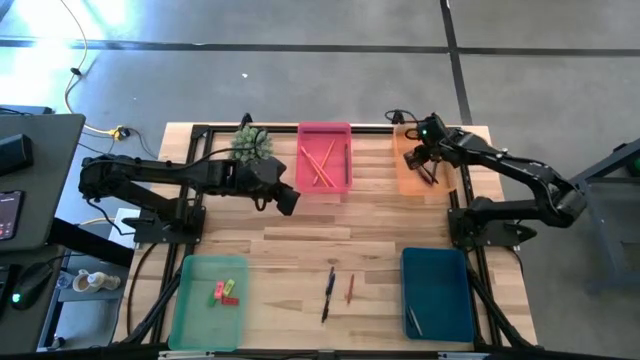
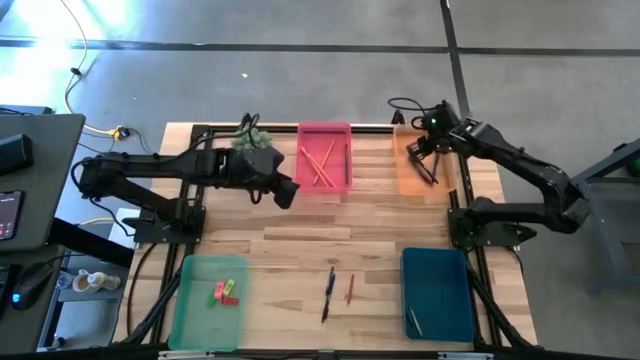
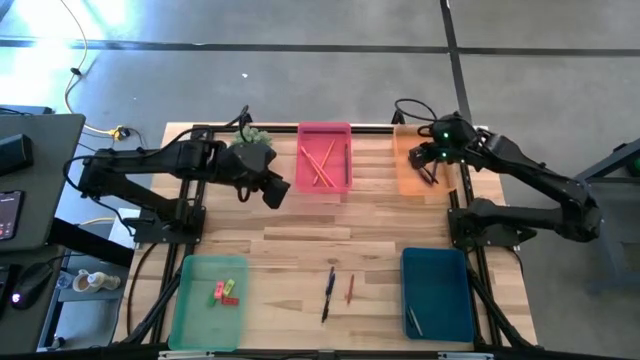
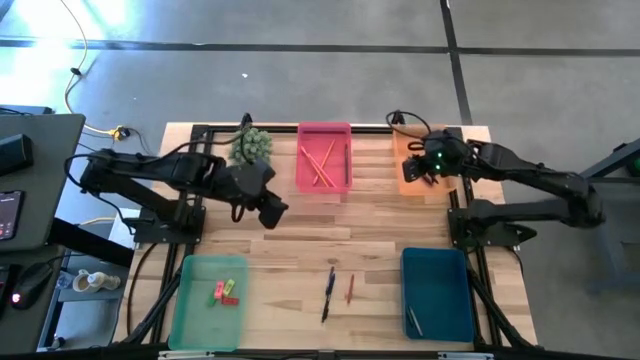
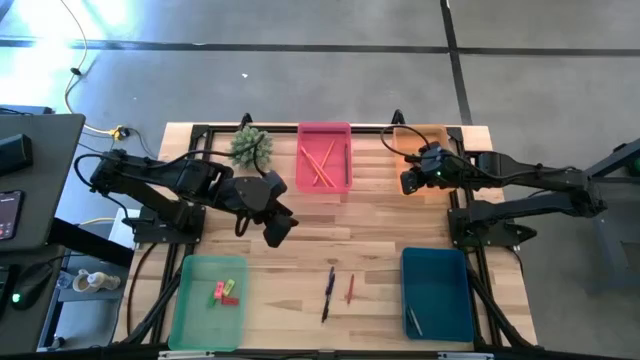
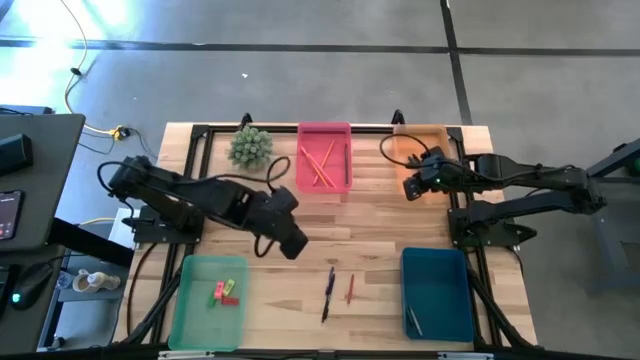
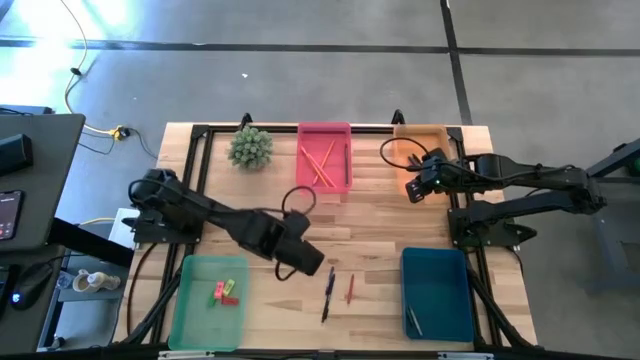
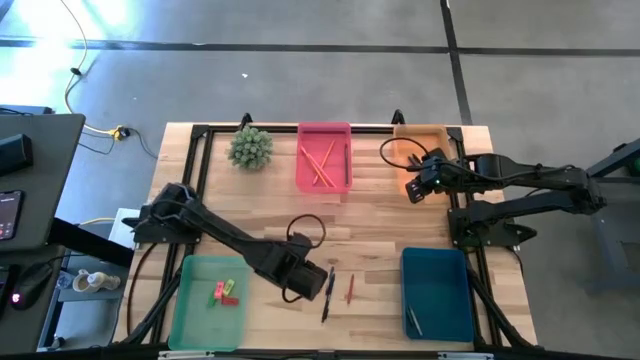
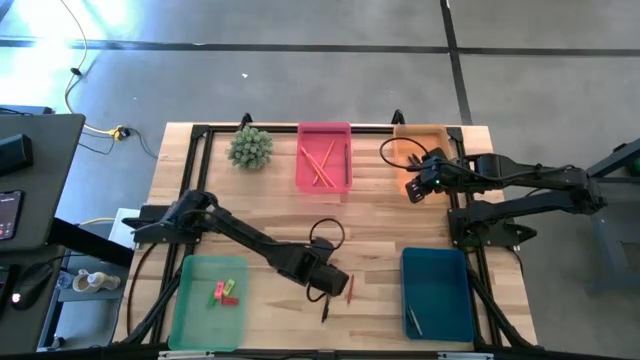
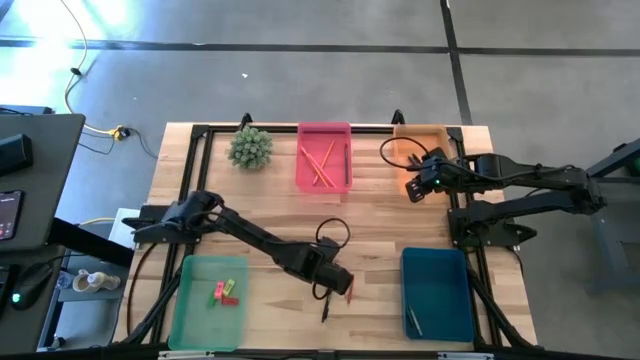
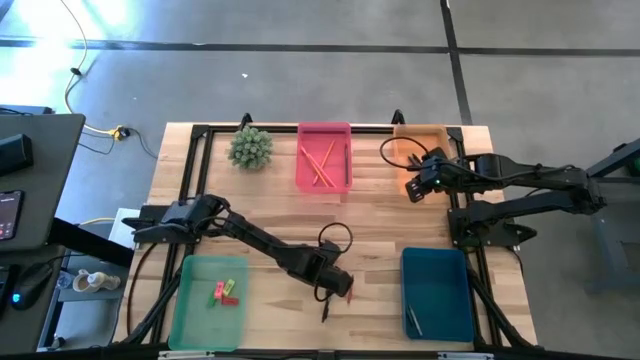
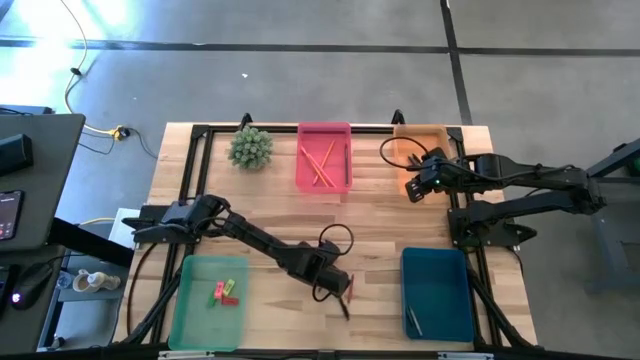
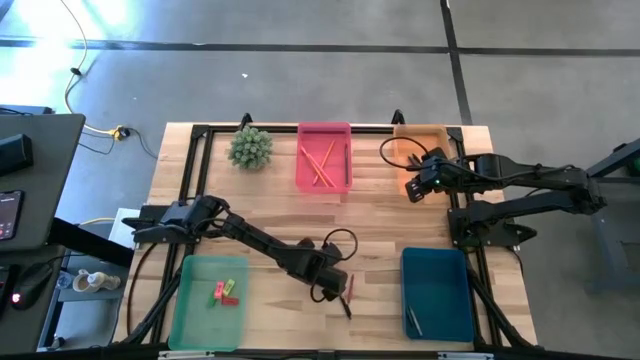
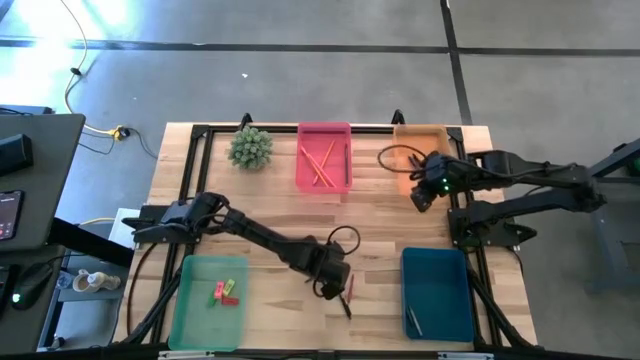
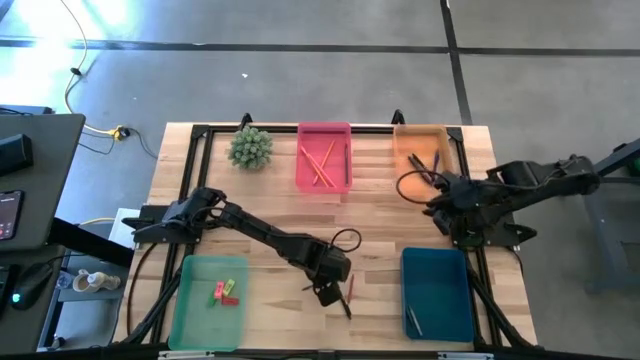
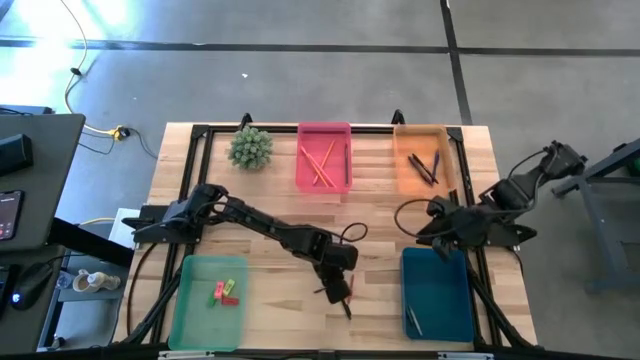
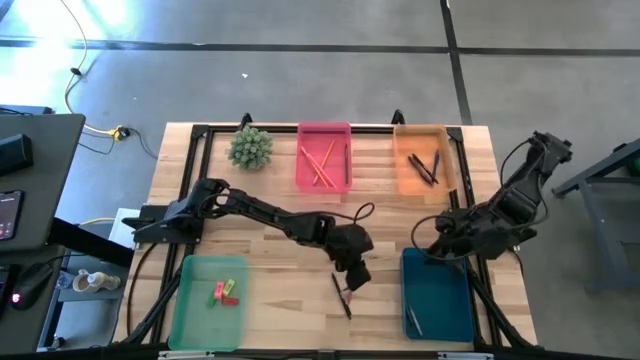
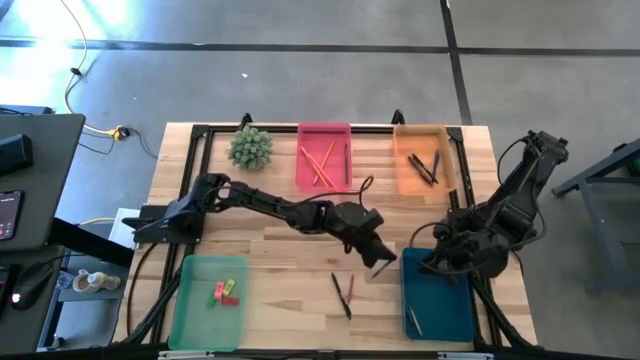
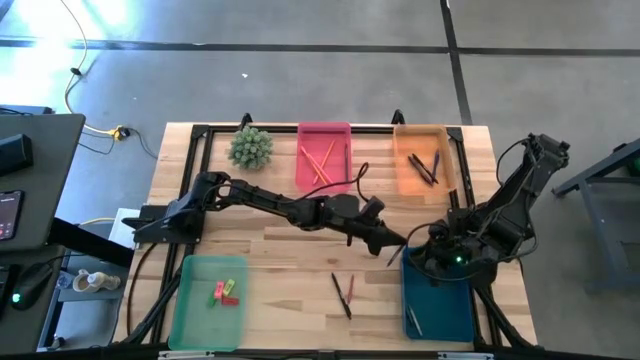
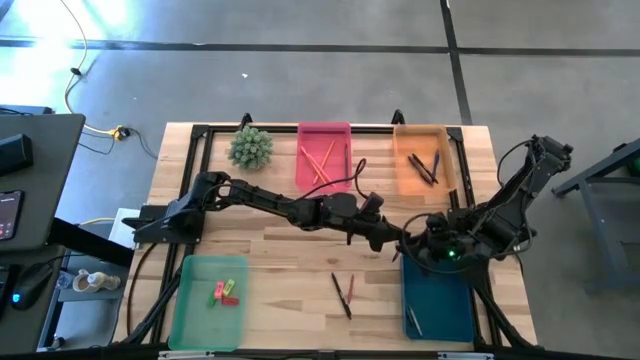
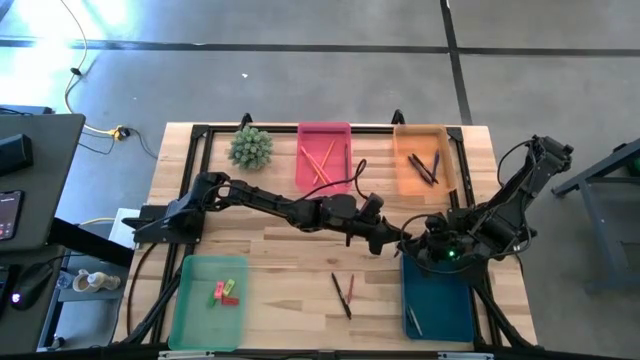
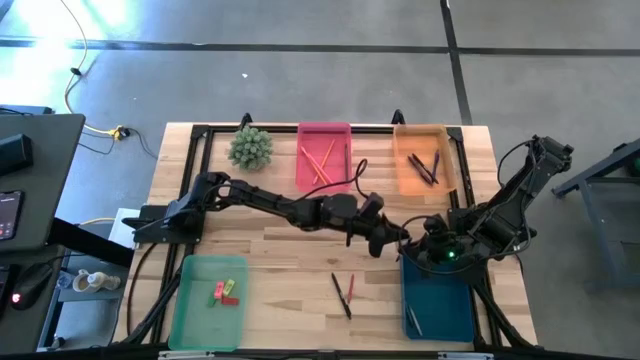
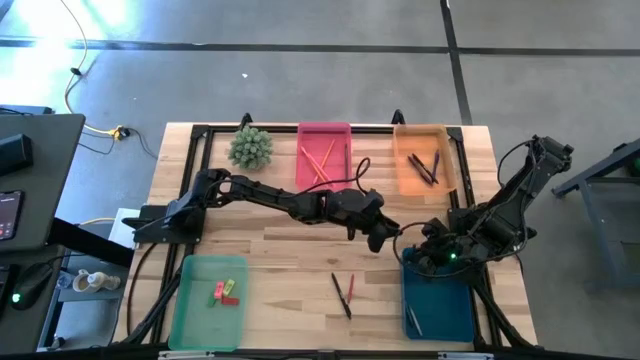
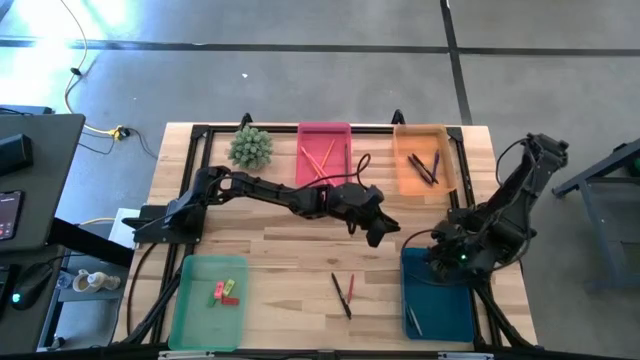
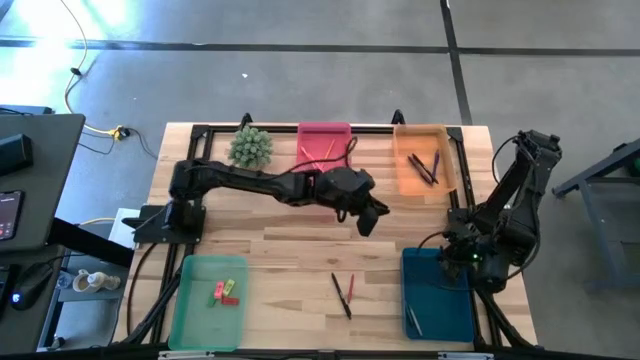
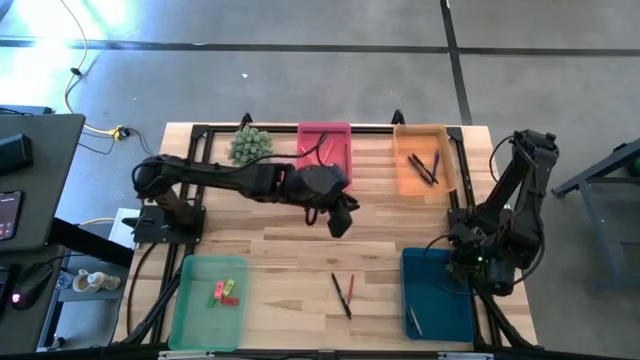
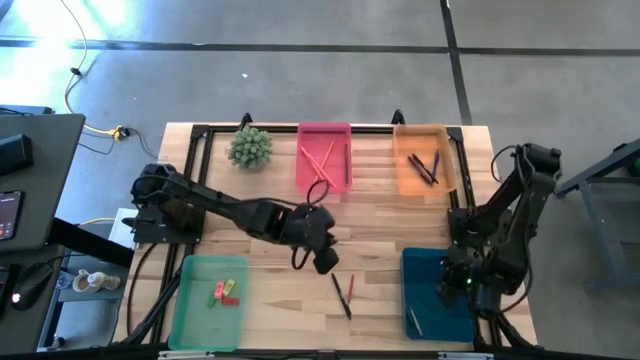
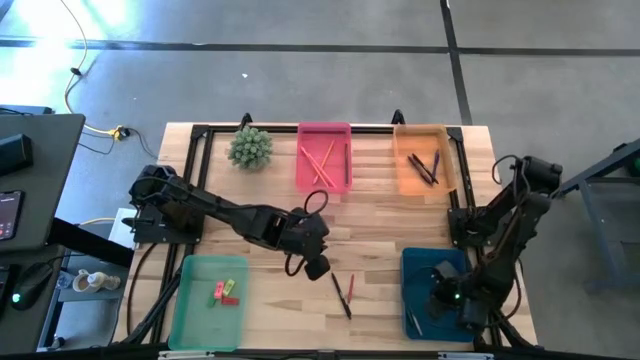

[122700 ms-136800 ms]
Task: Sort crayons/erasers/pens/pencils in bins
Put the blue crayon into the blue bin

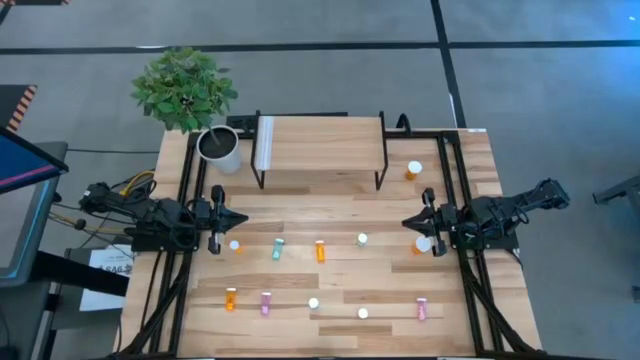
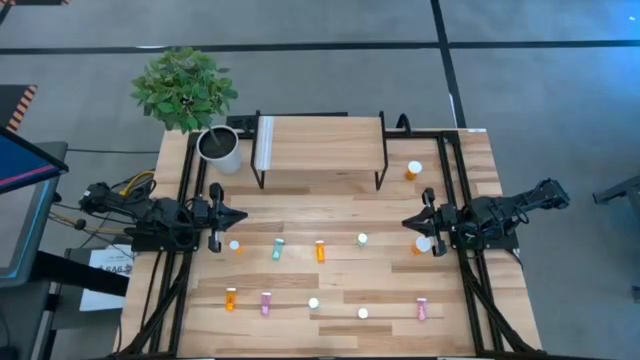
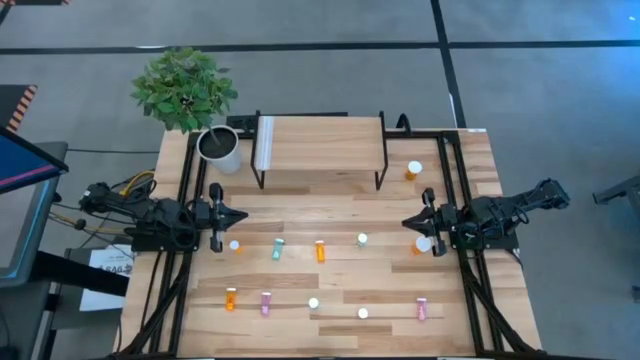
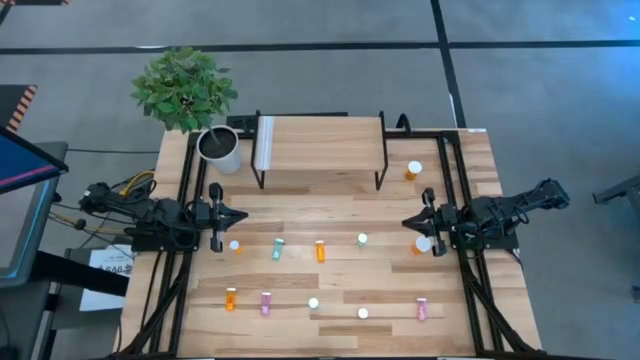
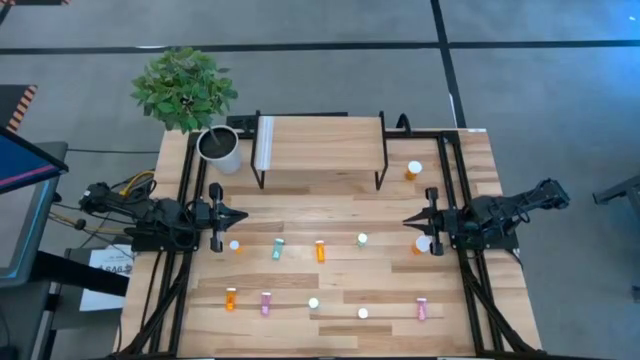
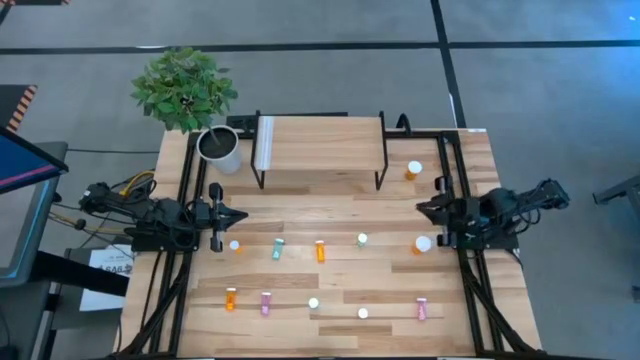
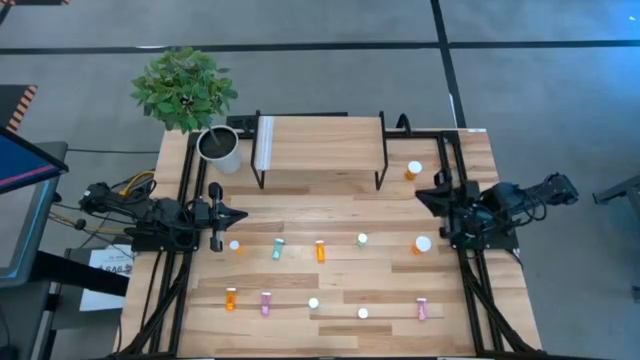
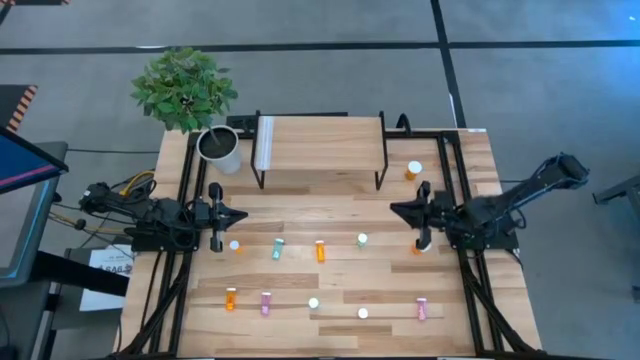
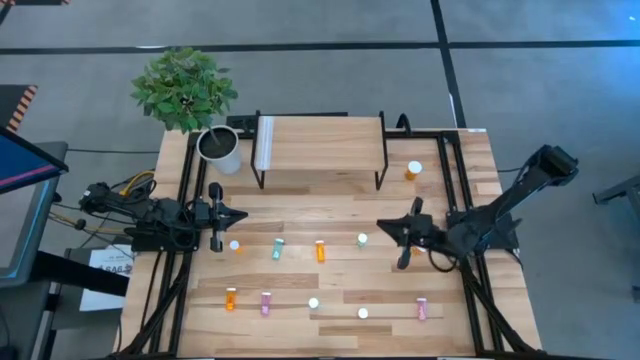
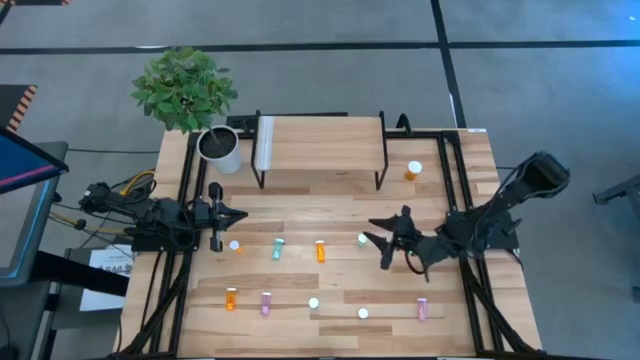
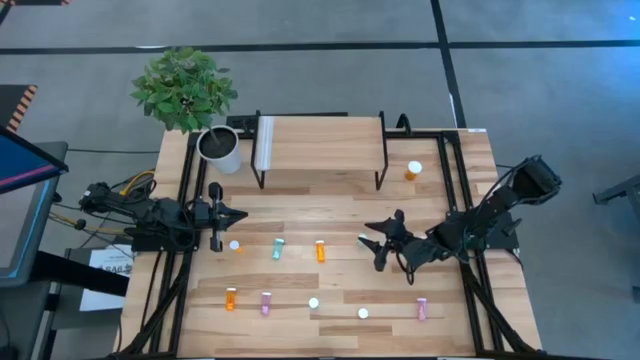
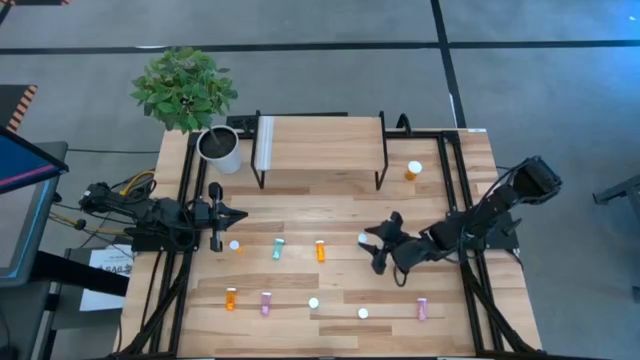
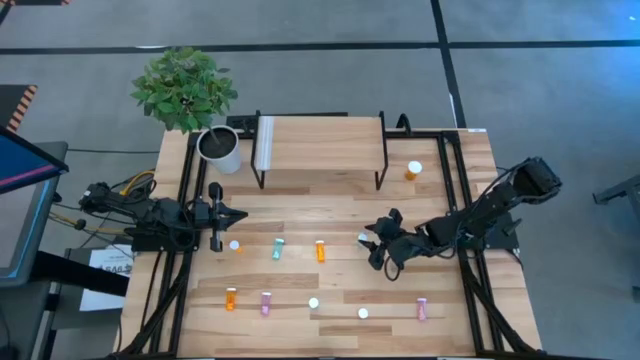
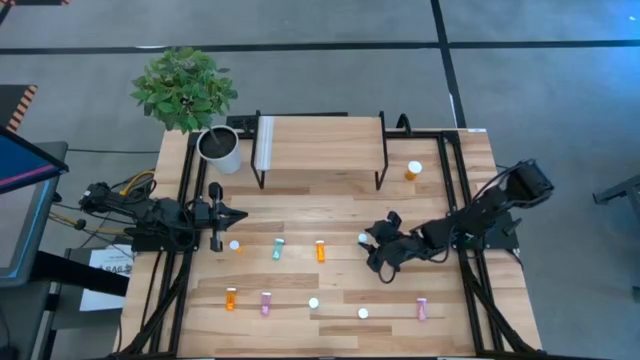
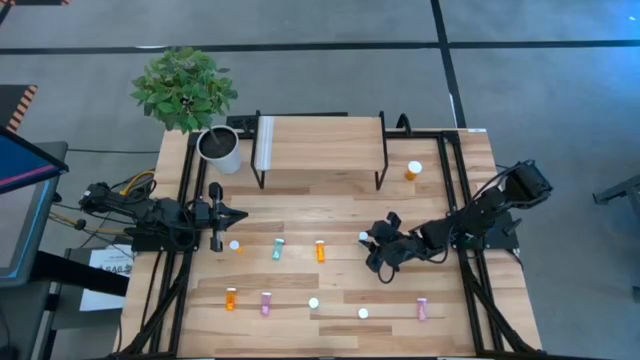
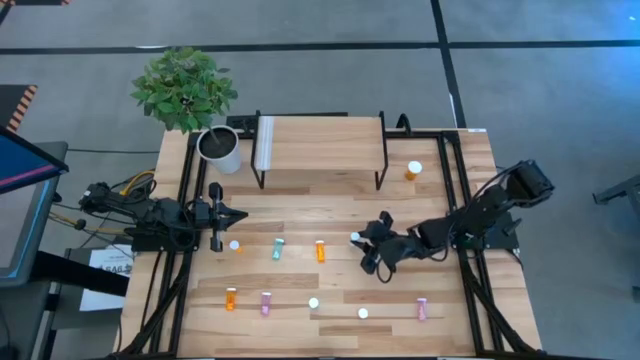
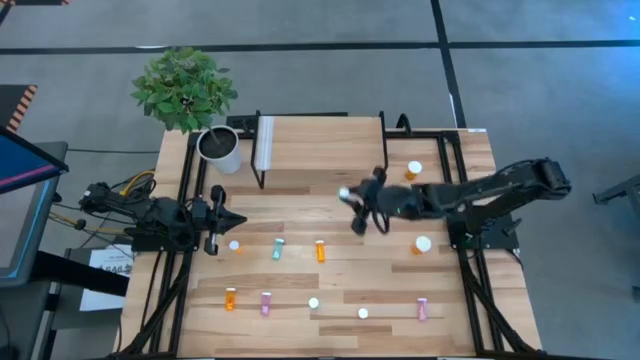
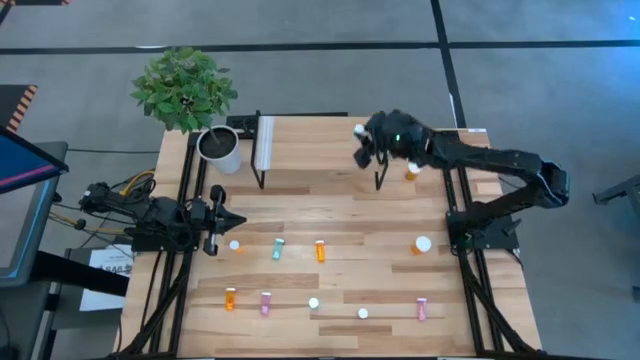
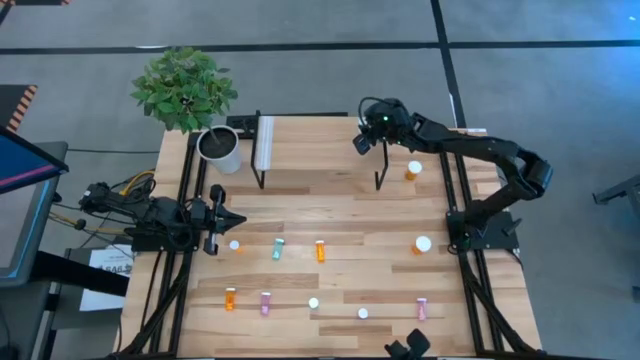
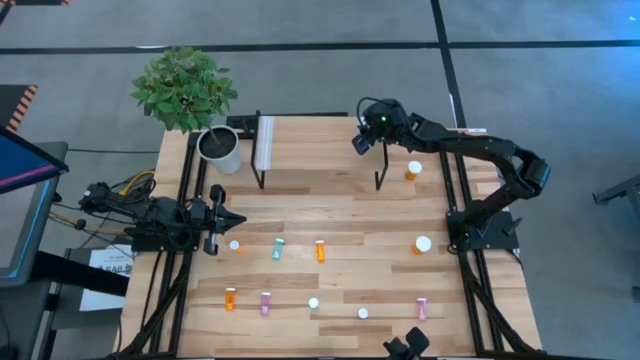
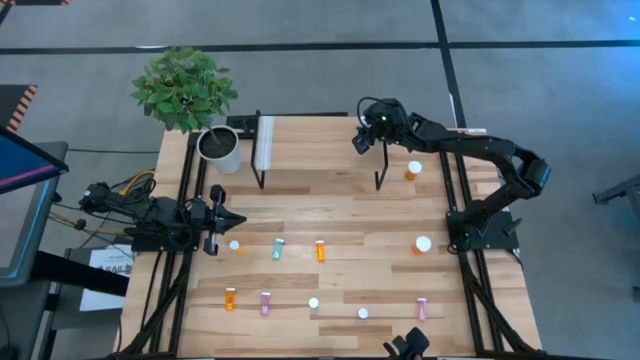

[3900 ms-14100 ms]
Task: Pick and place medicine bottles onto shelf by color
Put the top right blue pill bottle on the shelf
